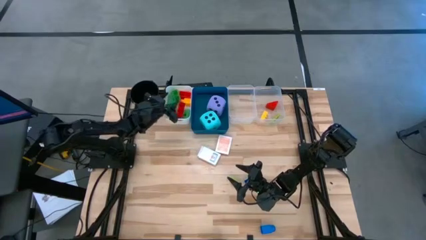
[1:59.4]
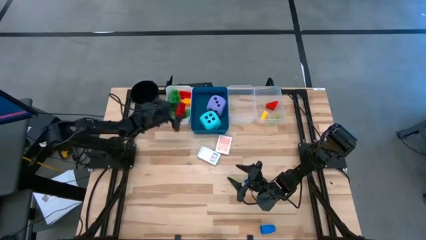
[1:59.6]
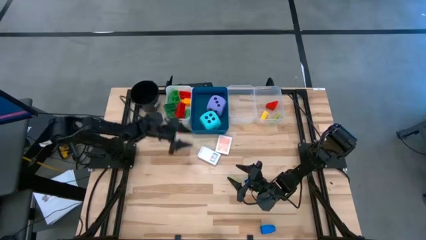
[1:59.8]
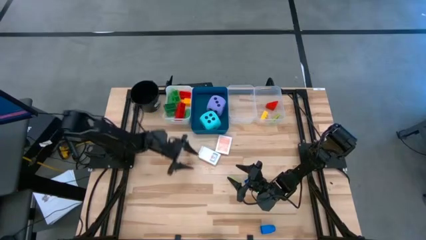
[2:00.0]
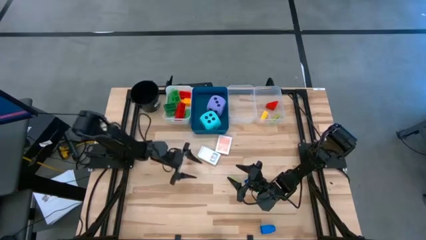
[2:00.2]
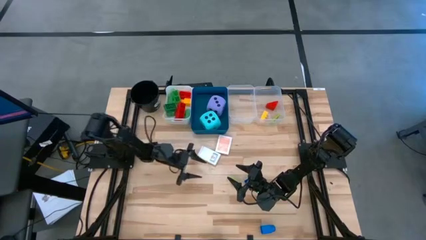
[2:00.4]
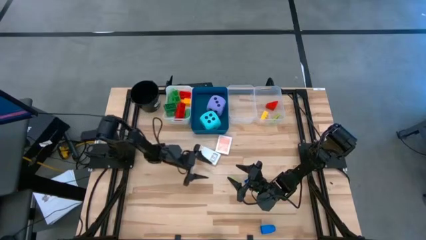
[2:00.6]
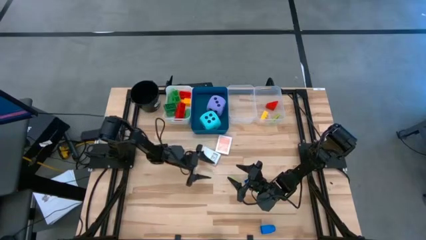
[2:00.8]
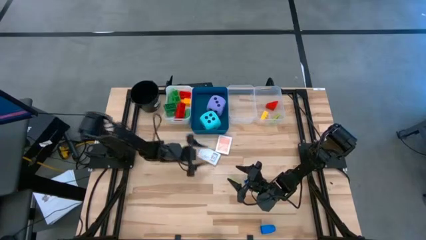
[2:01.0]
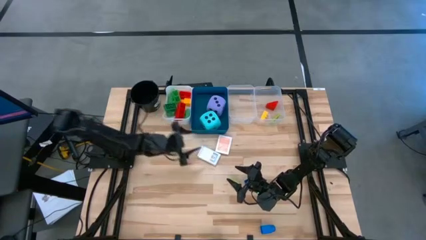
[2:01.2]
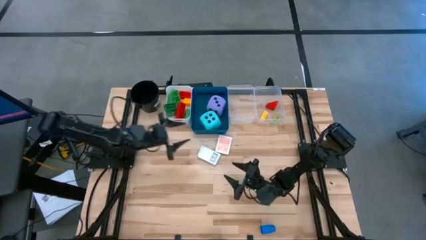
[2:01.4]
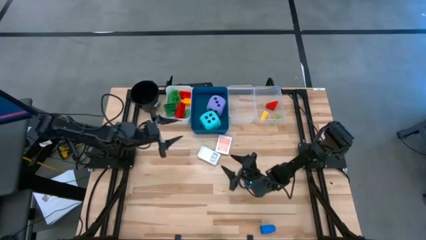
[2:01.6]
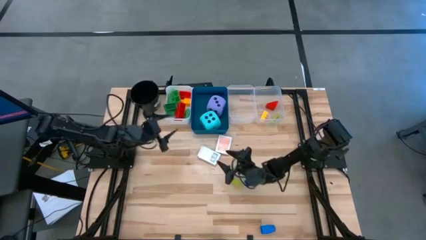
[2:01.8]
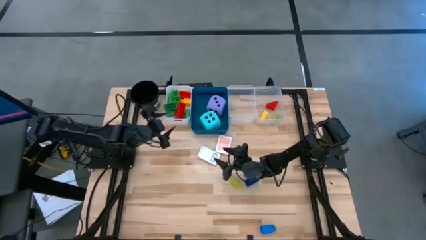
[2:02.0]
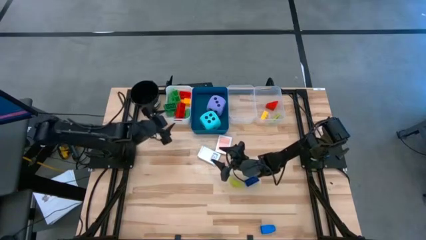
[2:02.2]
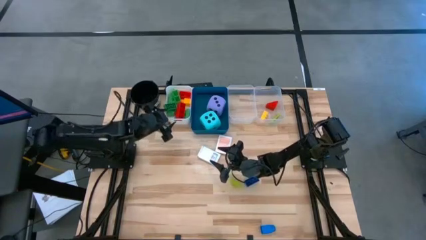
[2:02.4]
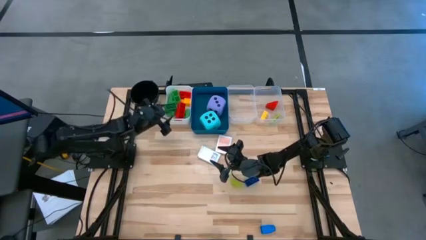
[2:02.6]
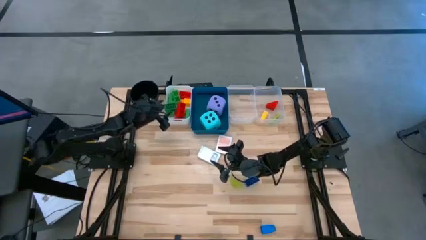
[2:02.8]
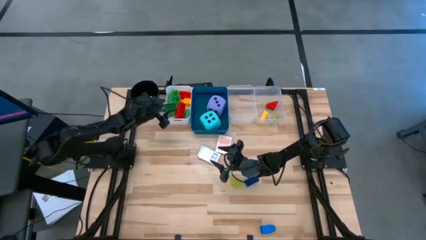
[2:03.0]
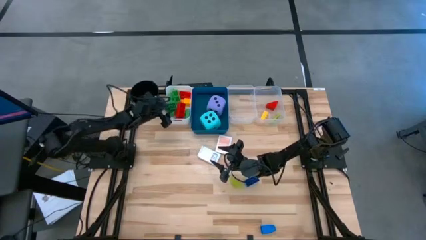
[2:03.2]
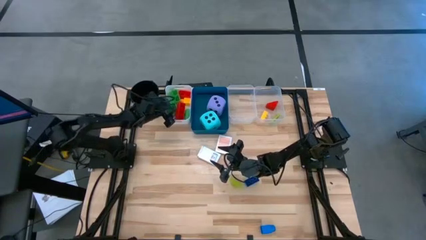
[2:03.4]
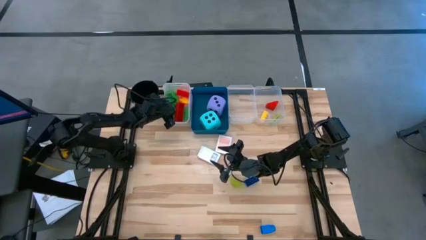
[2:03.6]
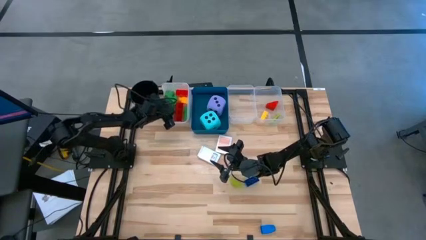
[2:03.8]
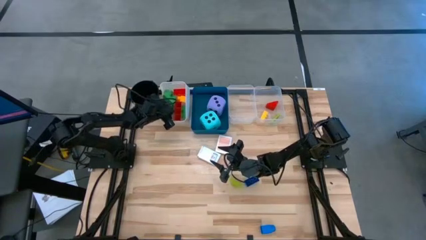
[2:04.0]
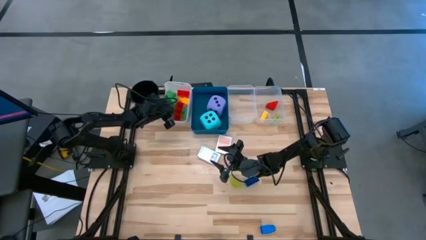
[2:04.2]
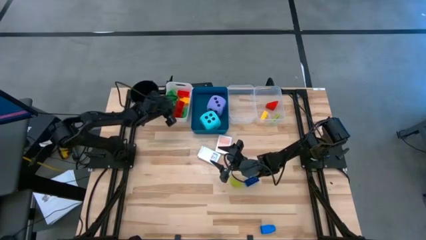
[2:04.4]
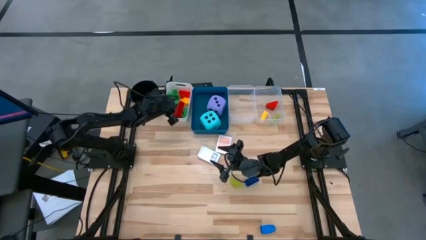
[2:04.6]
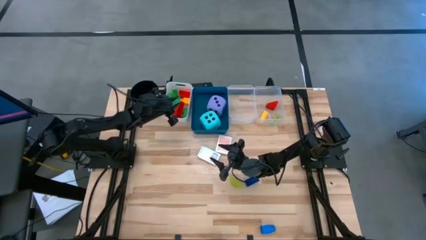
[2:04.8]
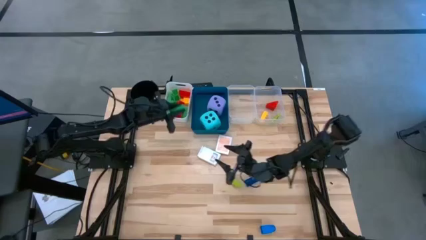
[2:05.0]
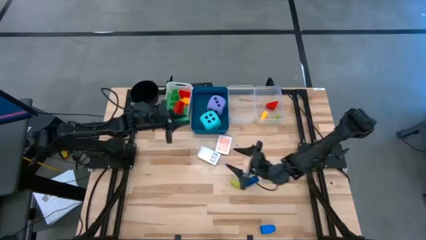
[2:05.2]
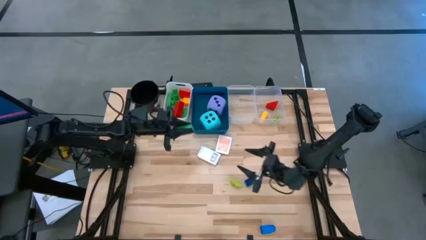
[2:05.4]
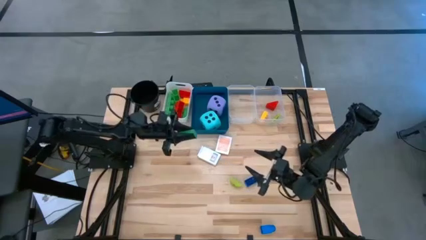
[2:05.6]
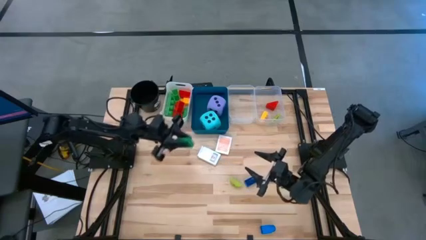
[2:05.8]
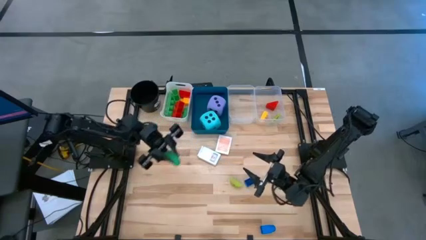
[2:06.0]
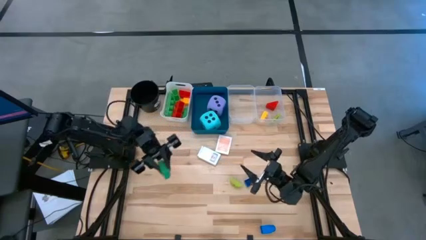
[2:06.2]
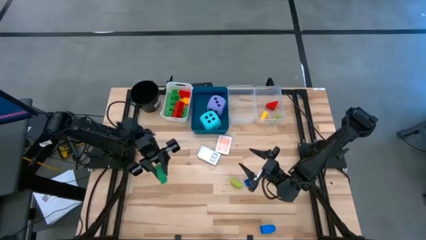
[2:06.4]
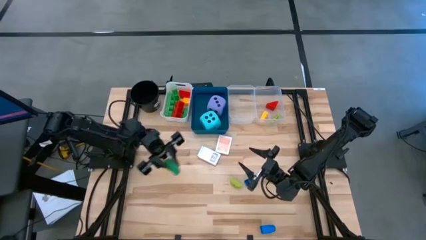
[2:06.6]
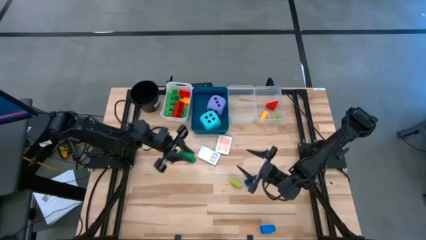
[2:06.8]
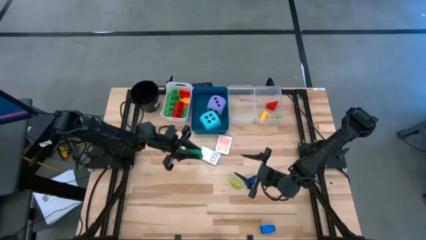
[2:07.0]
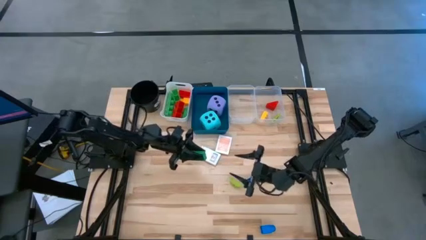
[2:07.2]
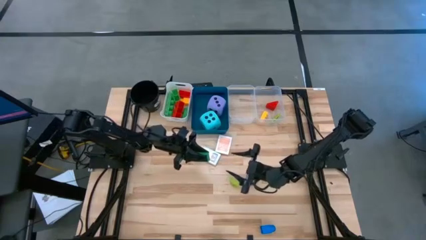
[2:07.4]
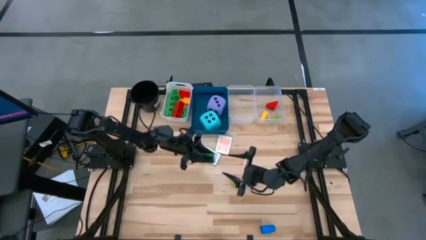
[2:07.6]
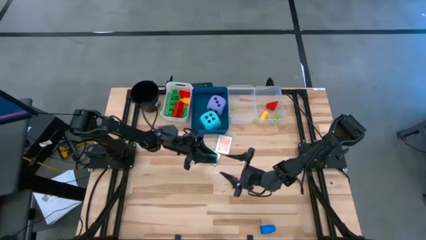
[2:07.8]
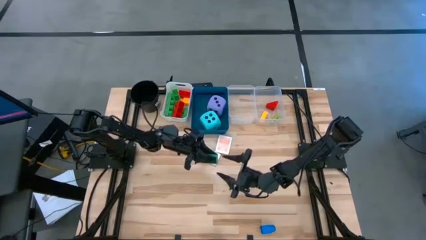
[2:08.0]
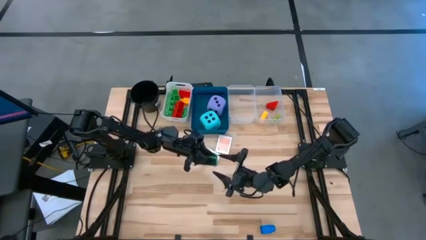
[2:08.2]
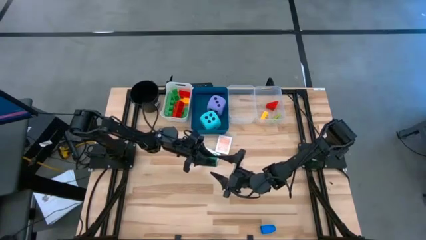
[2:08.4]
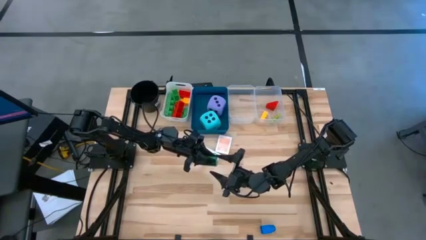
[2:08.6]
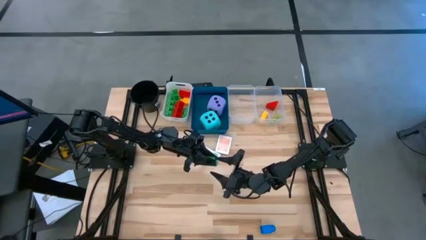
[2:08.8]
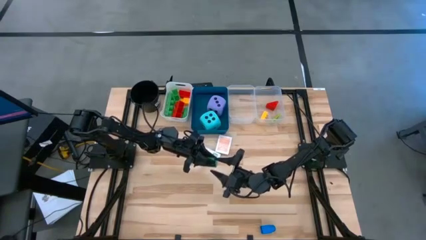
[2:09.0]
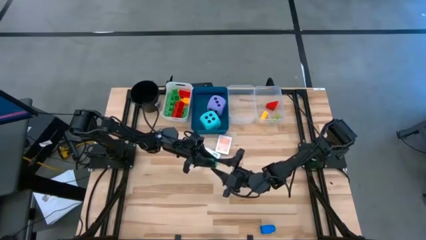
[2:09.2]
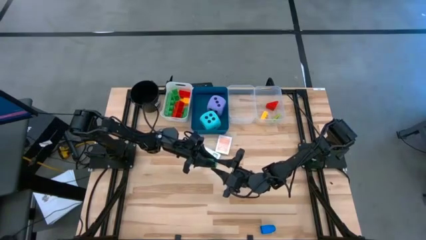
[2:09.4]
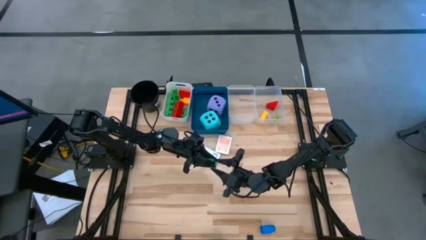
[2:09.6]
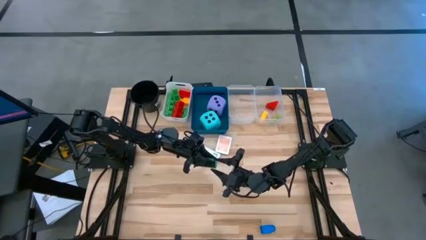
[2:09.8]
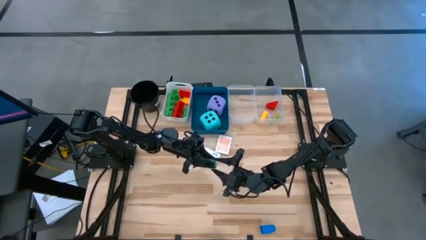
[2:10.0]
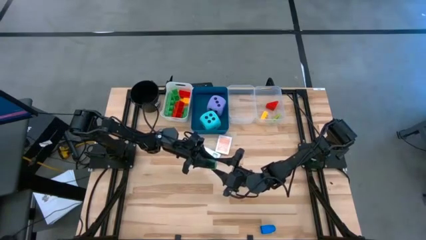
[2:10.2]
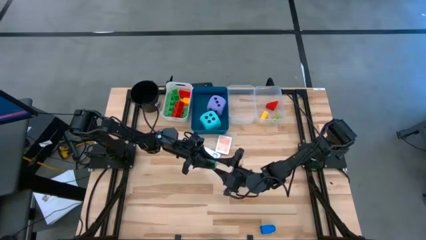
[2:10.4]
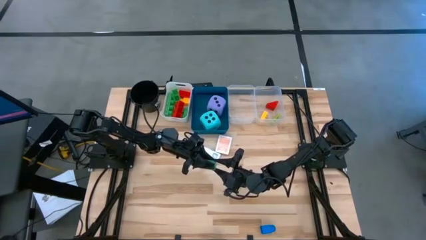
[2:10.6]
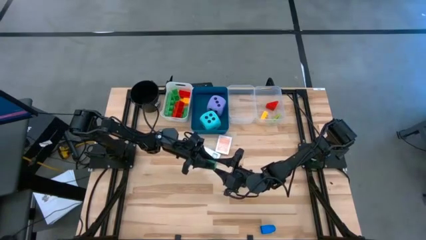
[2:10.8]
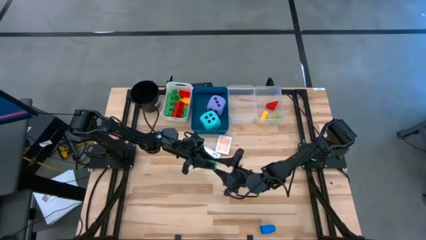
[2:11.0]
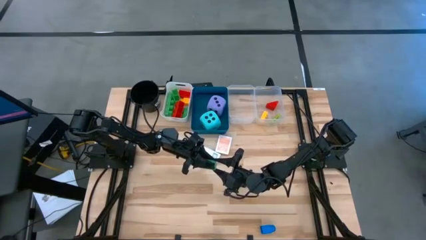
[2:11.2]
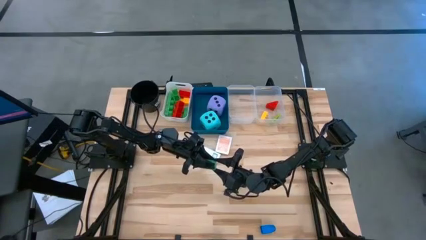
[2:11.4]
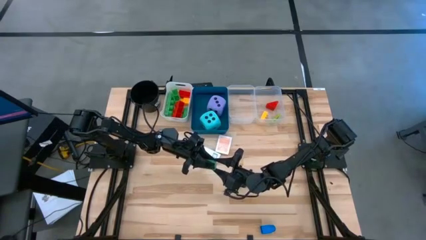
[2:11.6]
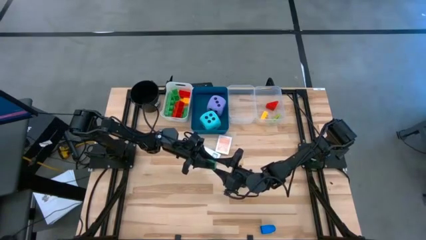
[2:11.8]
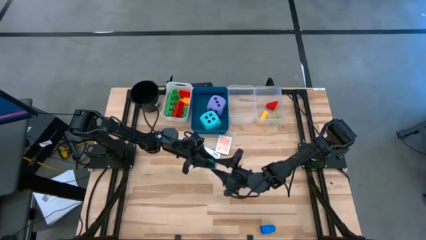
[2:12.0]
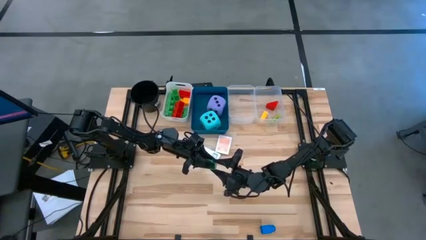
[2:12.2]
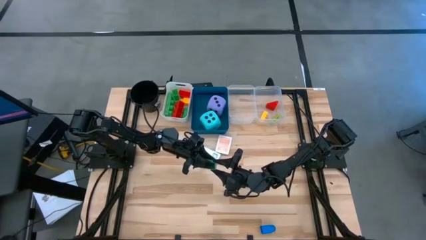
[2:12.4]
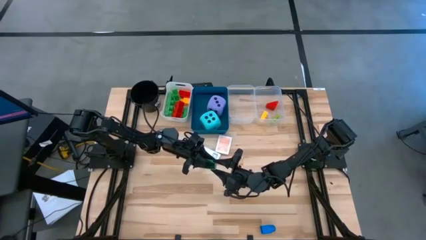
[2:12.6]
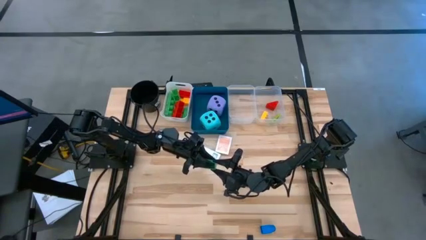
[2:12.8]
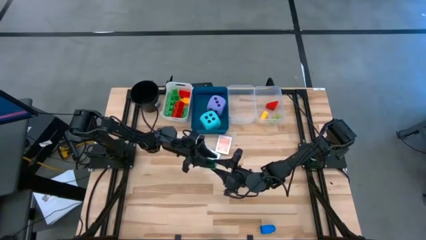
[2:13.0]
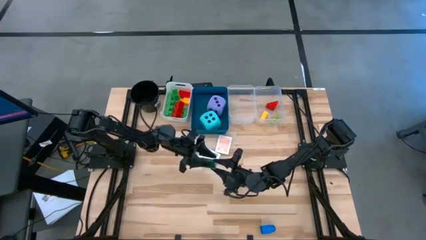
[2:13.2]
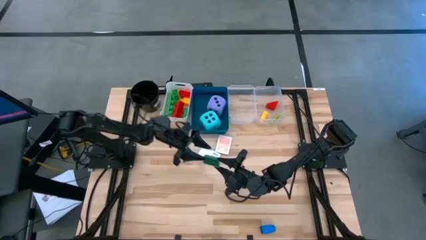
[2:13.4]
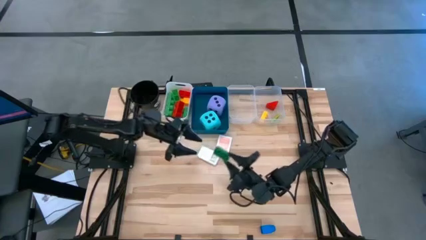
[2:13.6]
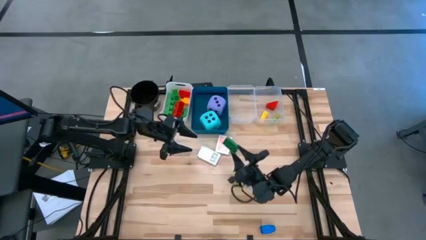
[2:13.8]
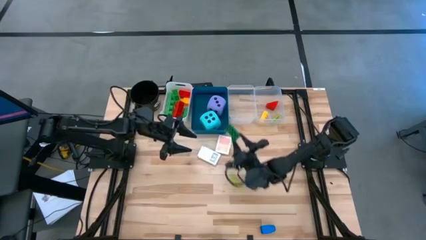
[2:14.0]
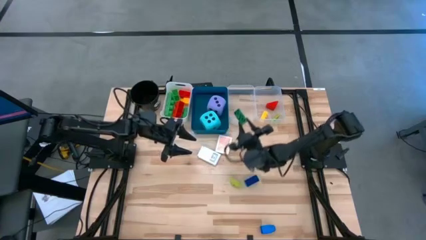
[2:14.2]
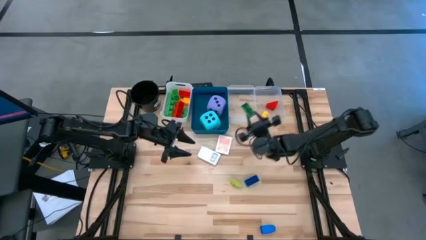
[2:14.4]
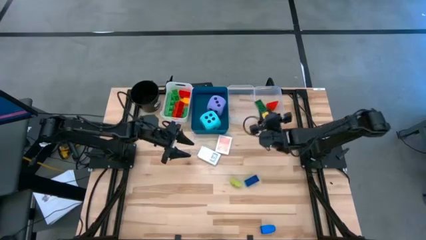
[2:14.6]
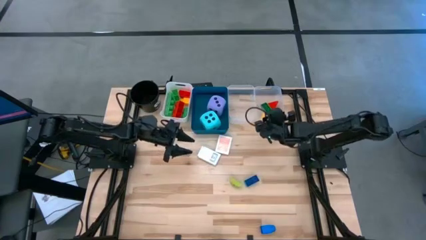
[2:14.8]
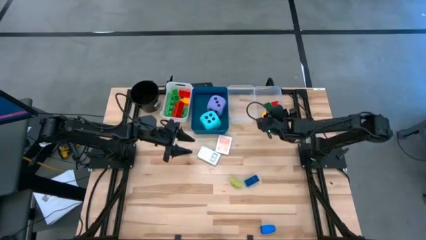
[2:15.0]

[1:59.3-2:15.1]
Task: Pick & Place Toys
Put the small green game piece into the right transparent bin
